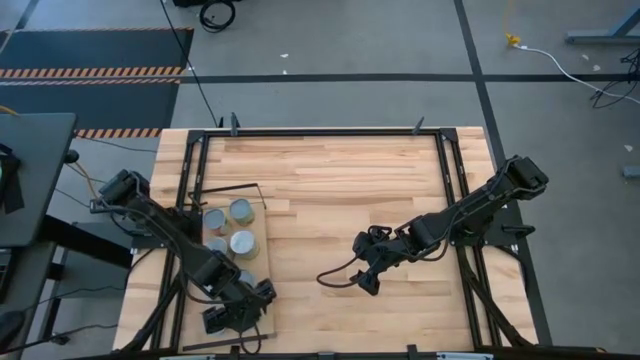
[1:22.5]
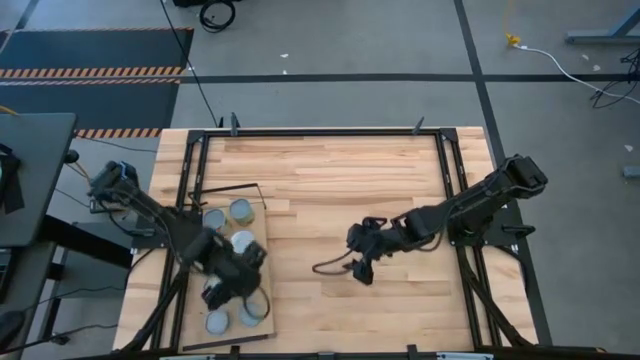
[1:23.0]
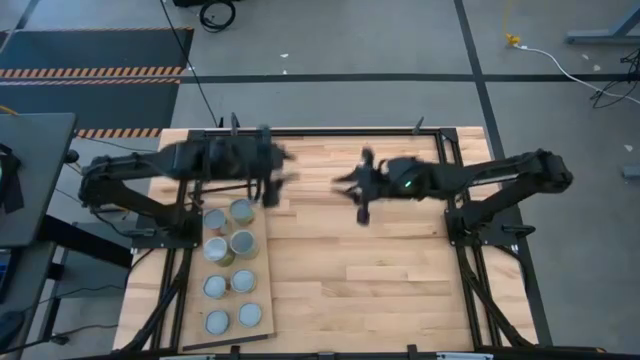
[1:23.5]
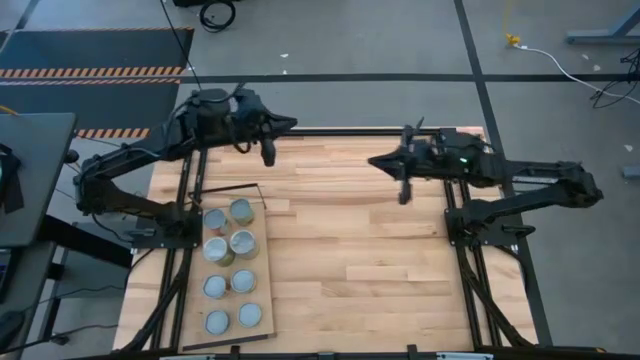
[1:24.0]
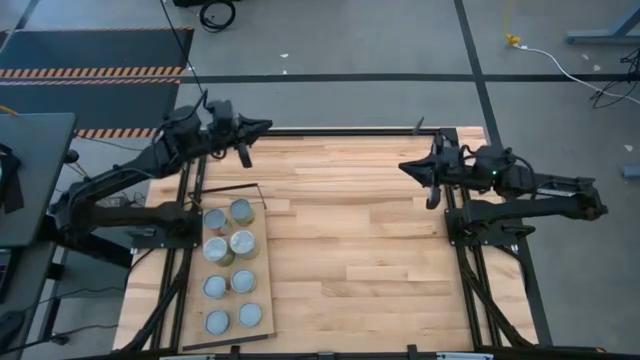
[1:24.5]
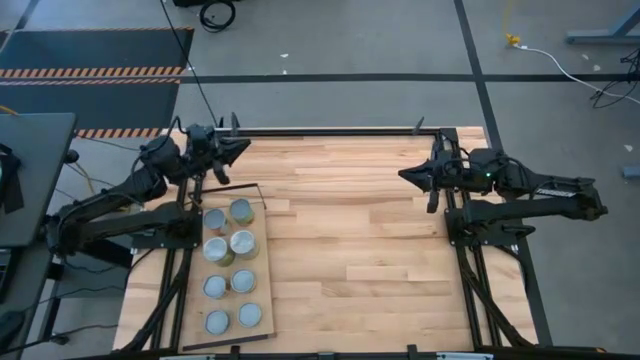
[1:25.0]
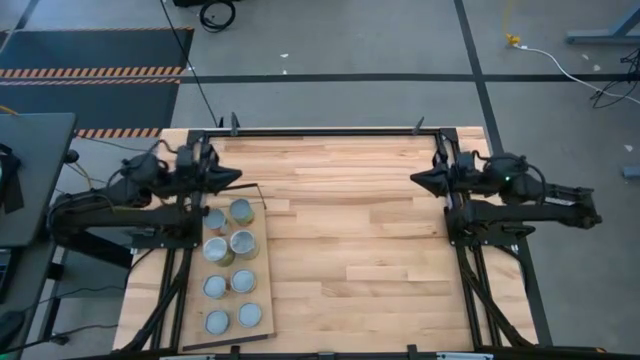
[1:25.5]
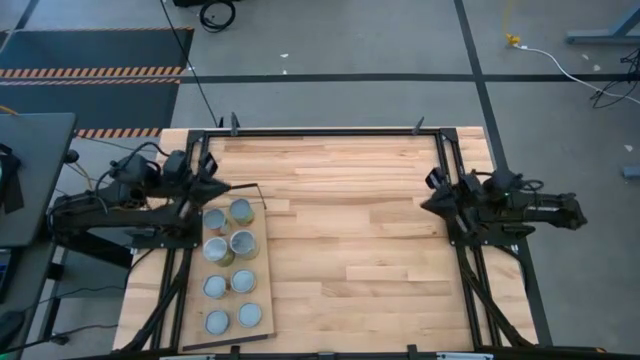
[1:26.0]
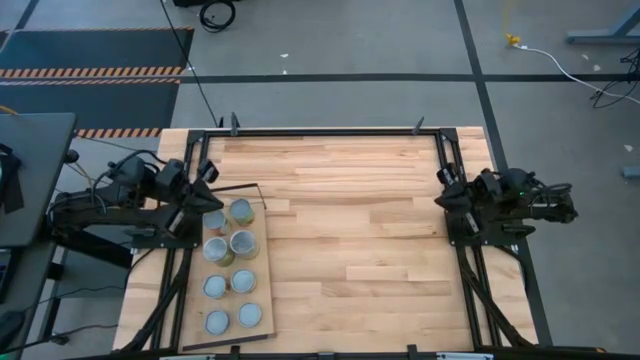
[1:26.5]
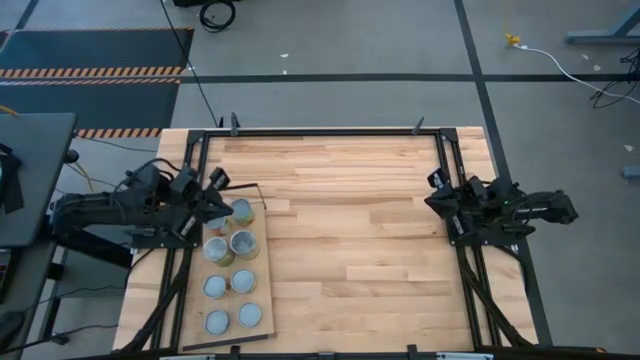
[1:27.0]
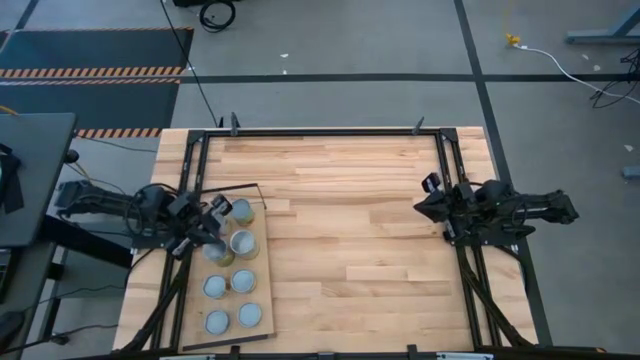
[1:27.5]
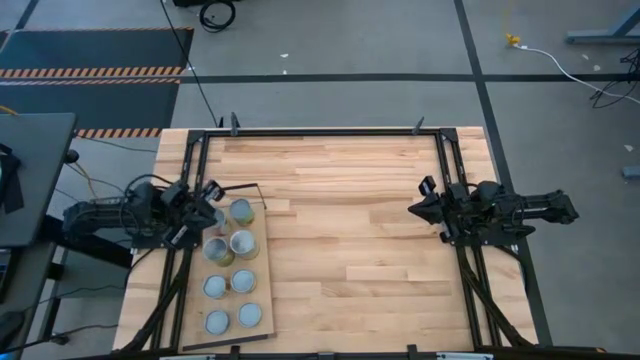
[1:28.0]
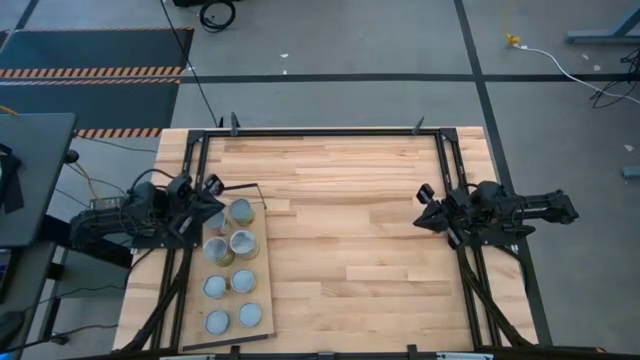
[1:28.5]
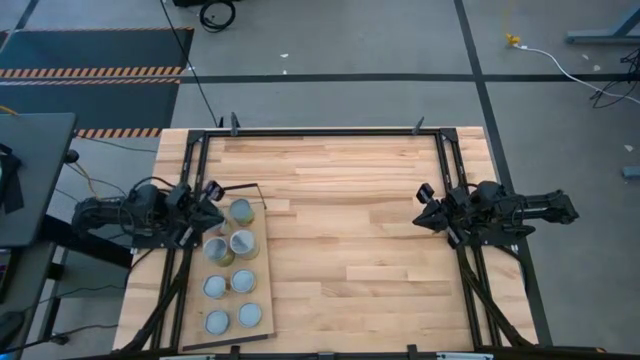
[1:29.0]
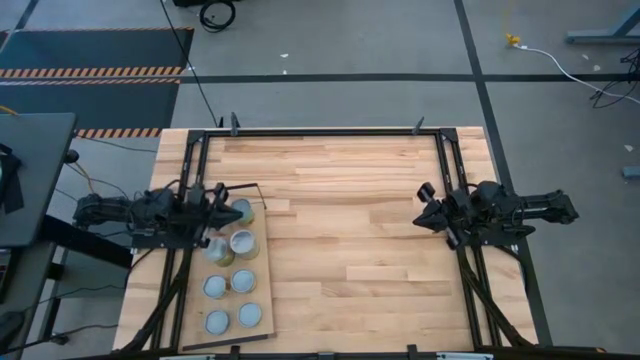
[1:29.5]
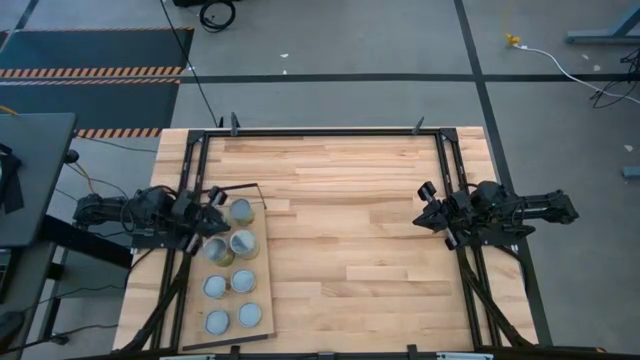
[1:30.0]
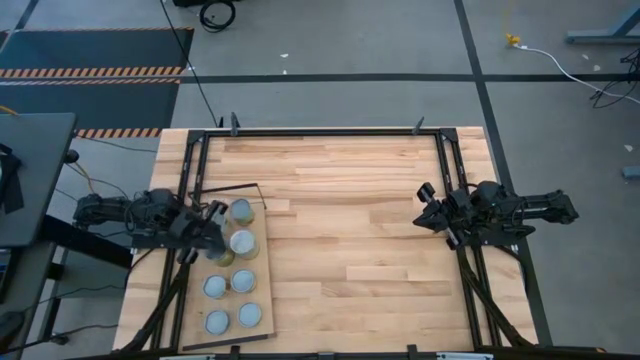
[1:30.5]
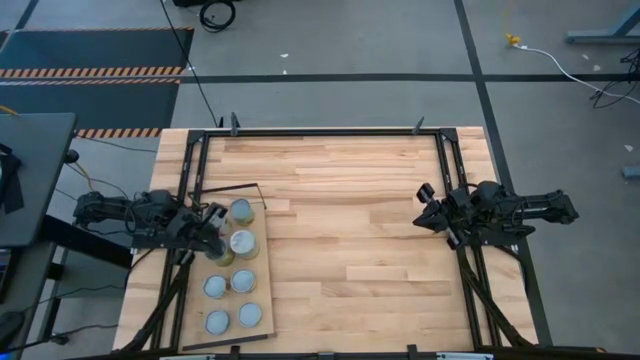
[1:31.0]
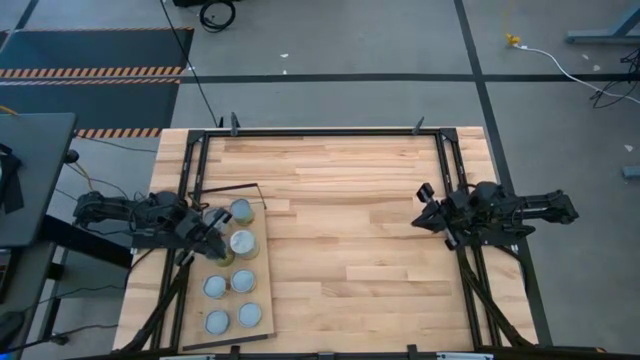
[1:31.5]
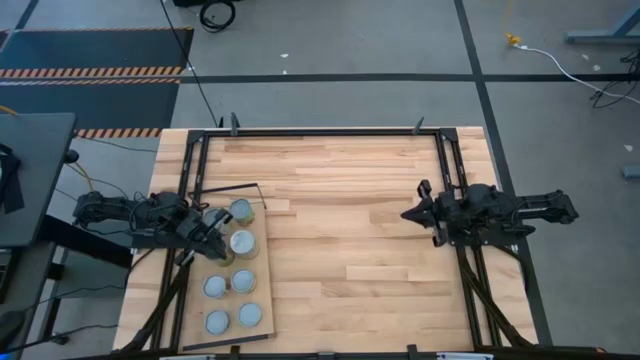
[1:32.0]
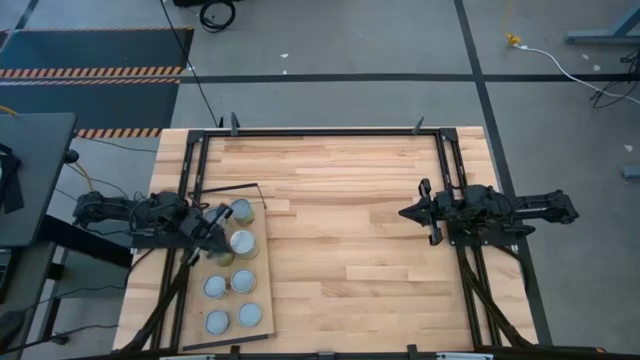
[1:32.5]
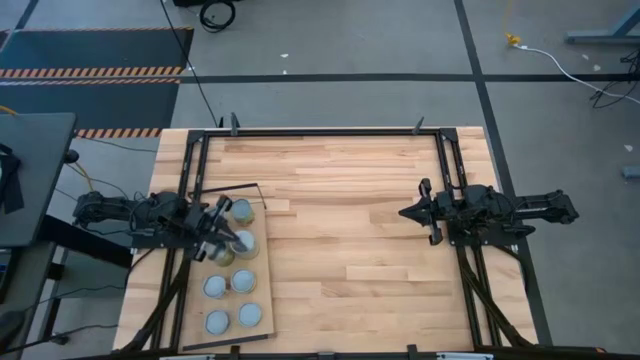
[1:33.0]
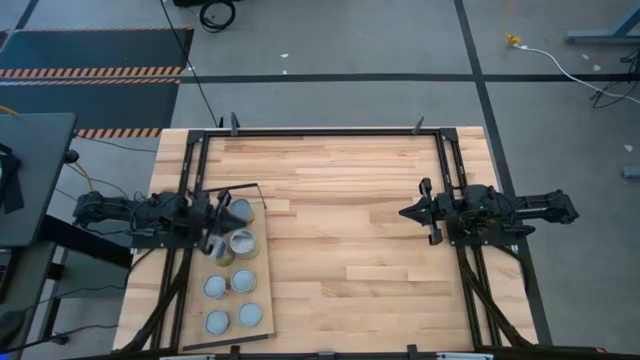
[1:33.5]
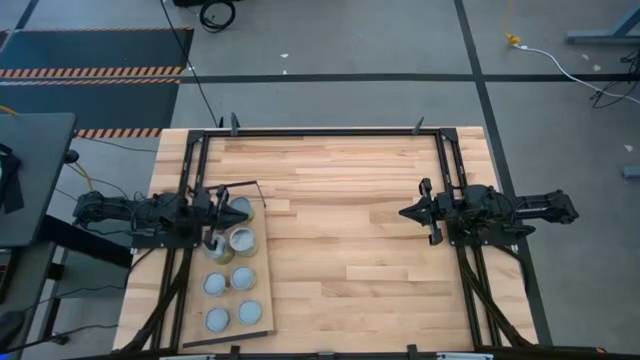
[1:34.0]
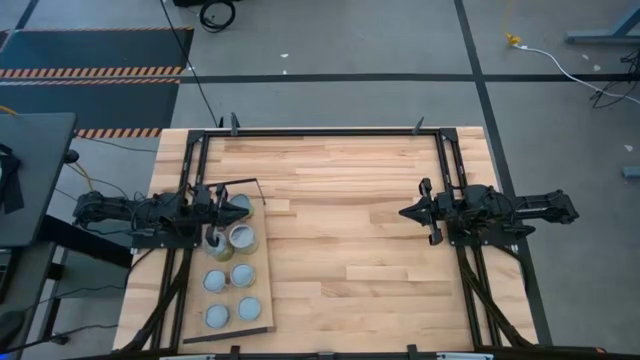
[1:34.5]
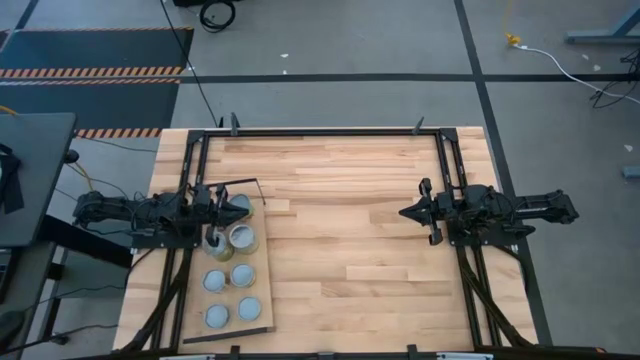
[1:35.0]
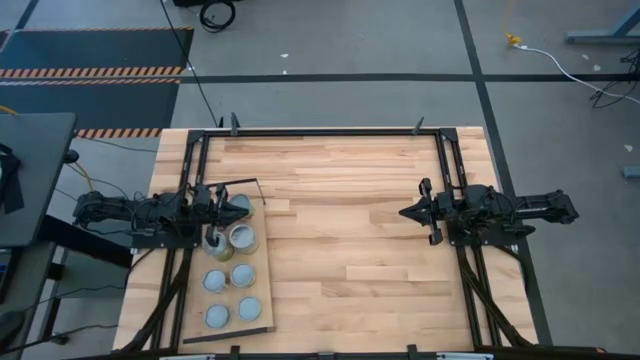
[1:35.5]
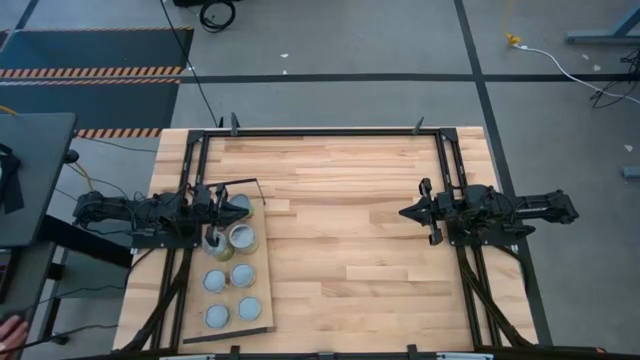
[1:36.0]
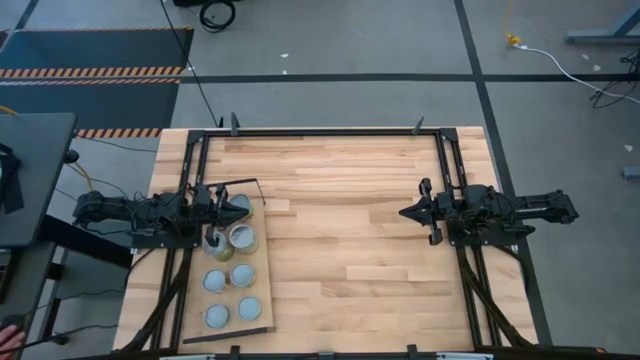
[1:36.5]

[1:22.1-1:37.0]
Task: Pick and place cans onto a shelf
Return to Home Position

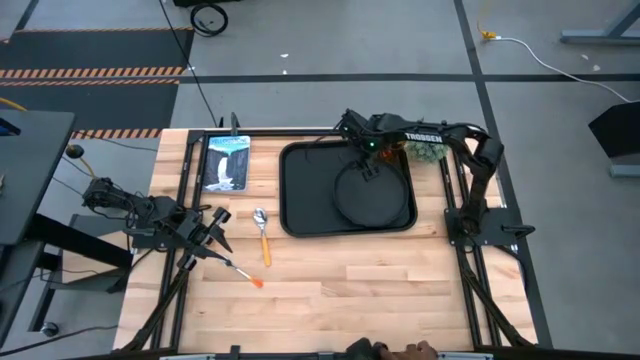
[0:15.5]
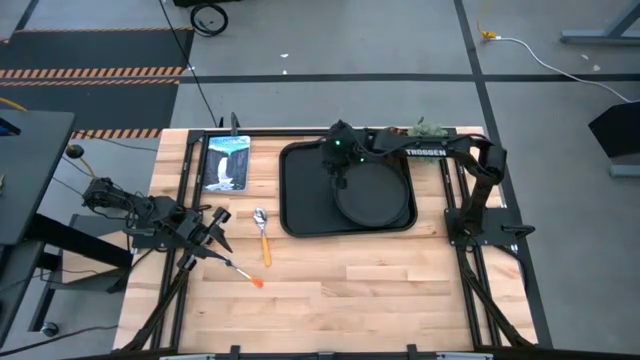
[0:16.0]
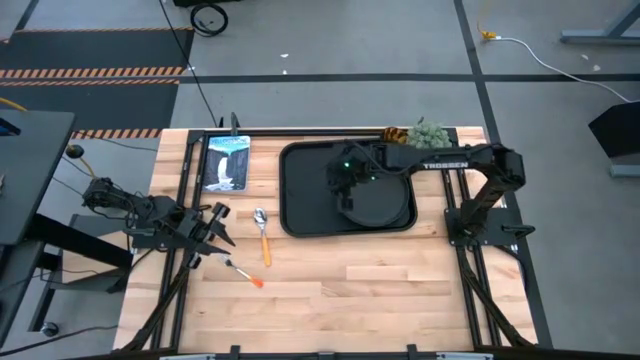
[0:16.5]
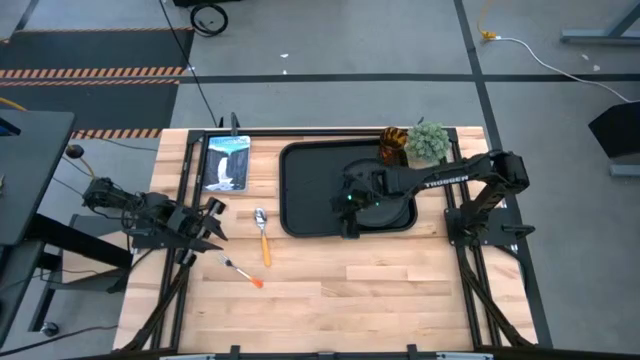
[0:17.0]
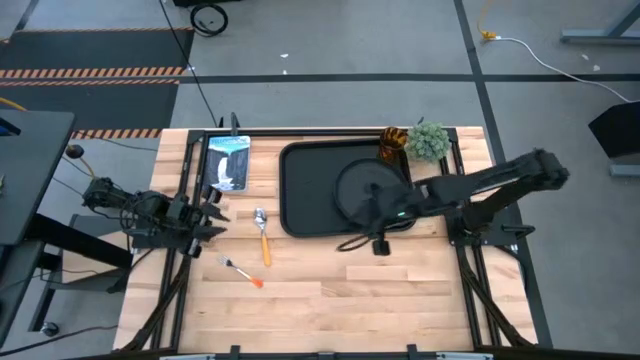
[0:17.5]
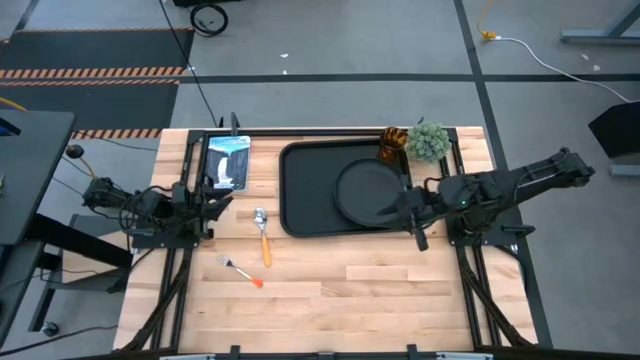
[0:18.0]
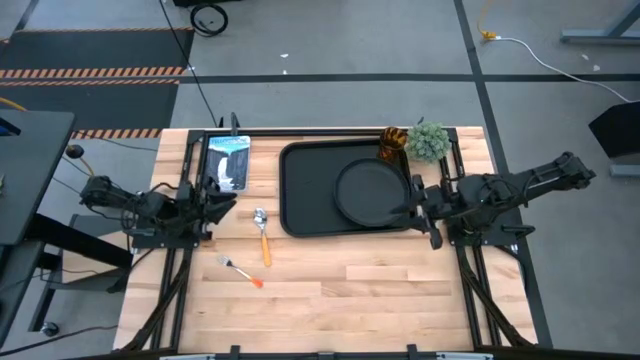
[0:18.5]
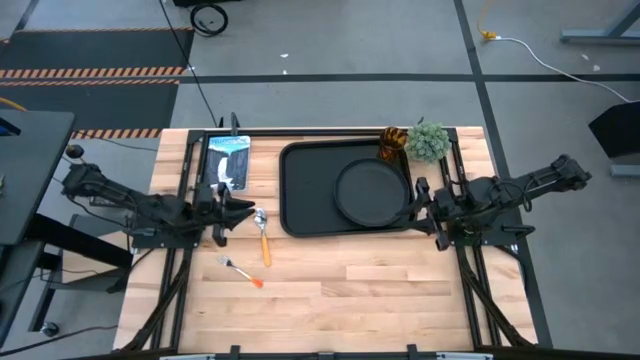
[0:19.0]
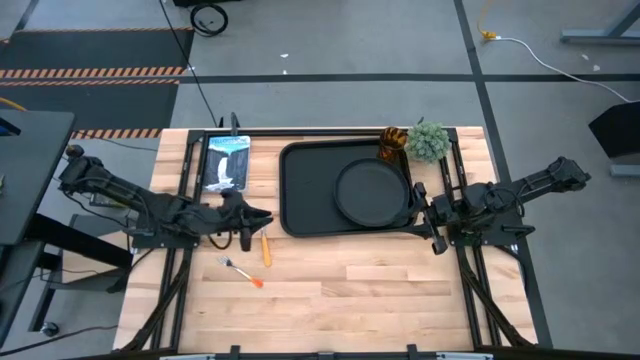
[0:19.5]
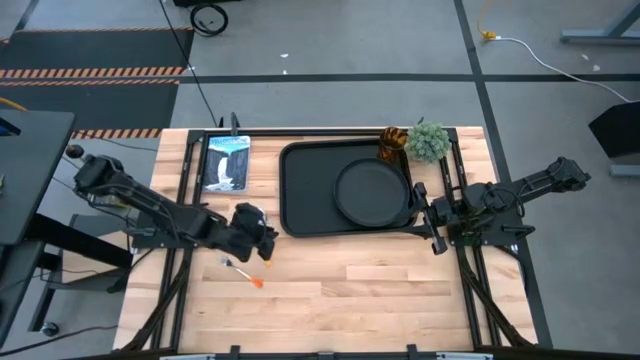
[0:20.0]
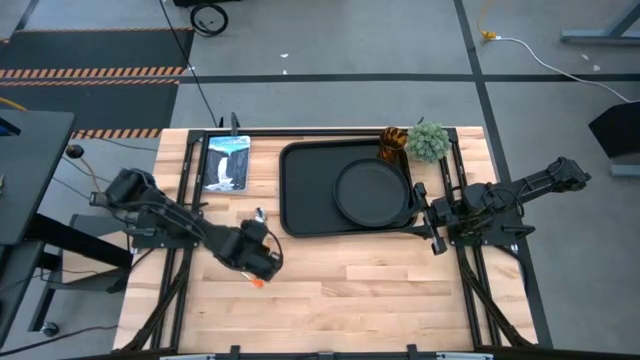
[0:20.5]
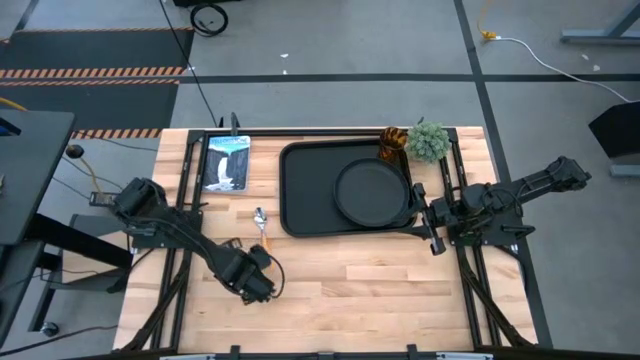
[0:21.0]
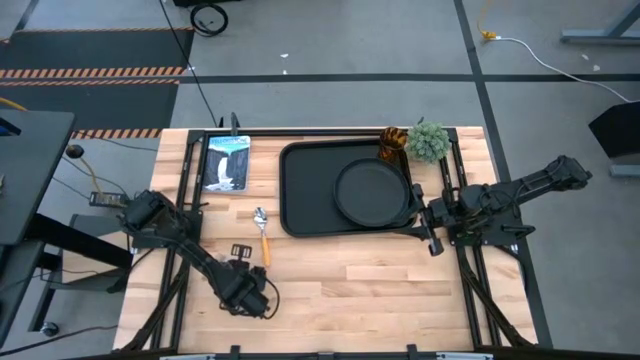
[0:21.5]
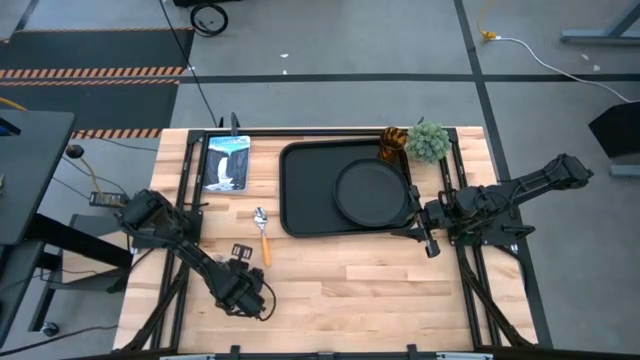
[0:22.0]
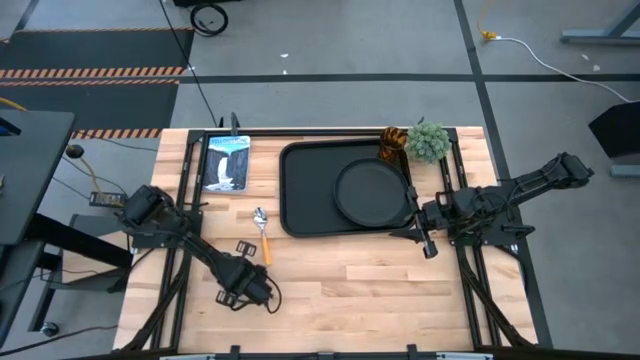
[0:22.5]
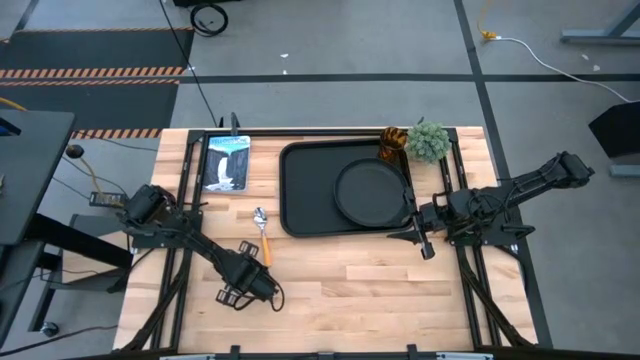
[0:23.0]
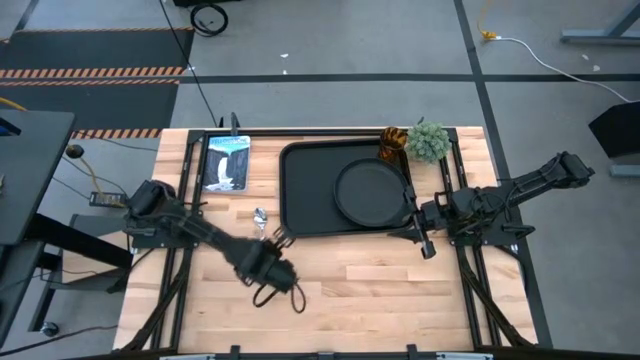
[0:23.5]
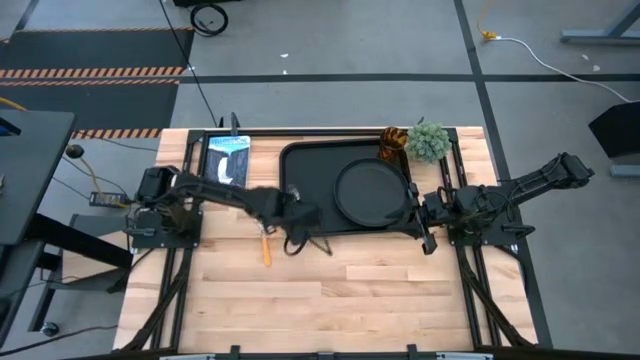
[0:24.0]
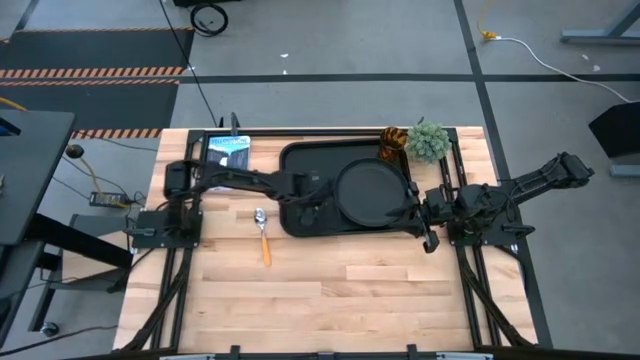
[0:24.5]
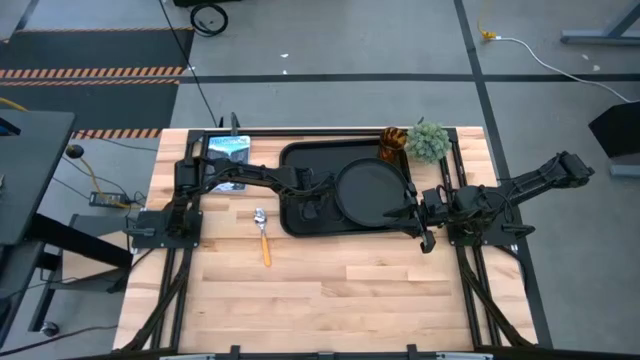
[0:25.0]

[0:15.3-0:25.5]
Task: Pick and place plate/cup/fork/spoon on tray
Put the orange fork to the left of the black plate on the black tray
